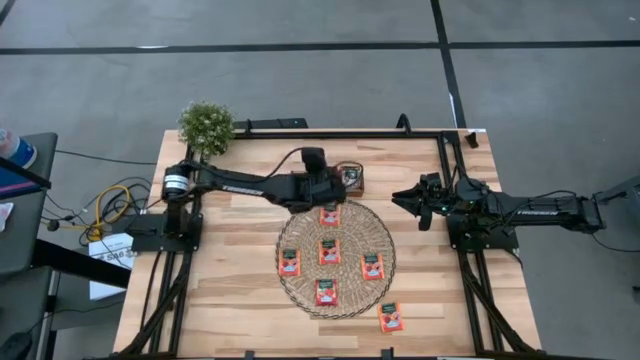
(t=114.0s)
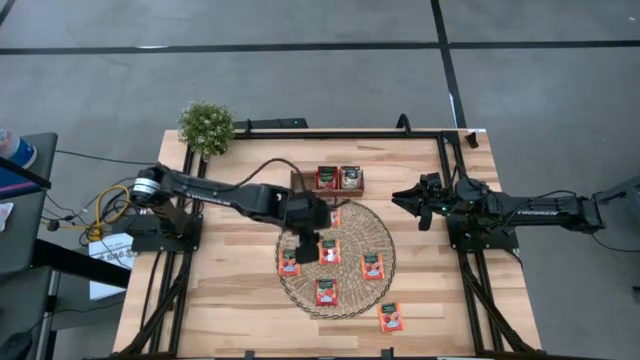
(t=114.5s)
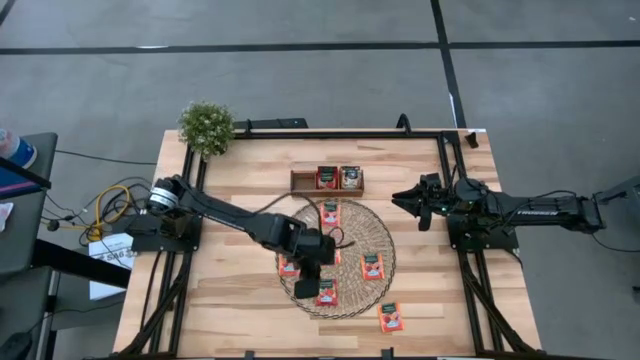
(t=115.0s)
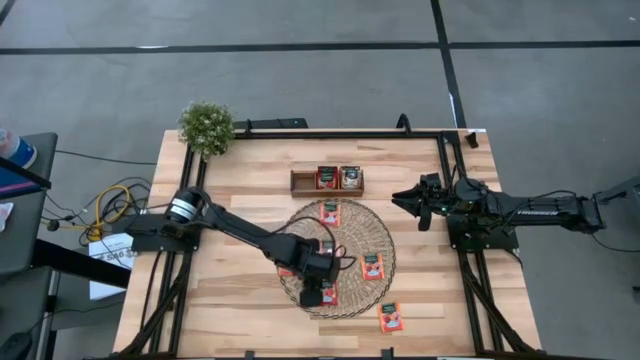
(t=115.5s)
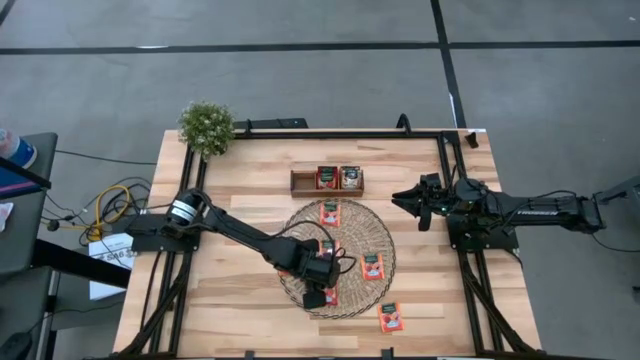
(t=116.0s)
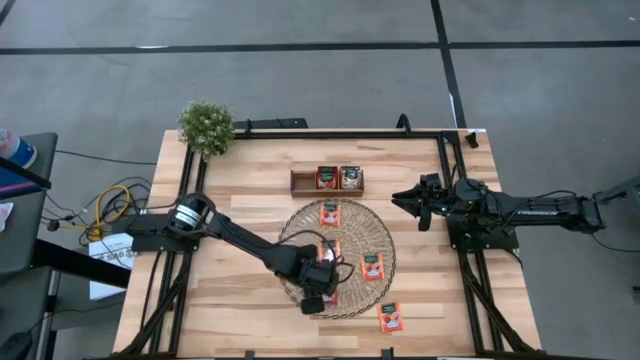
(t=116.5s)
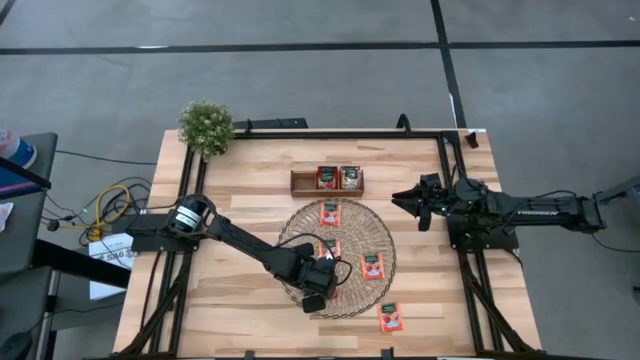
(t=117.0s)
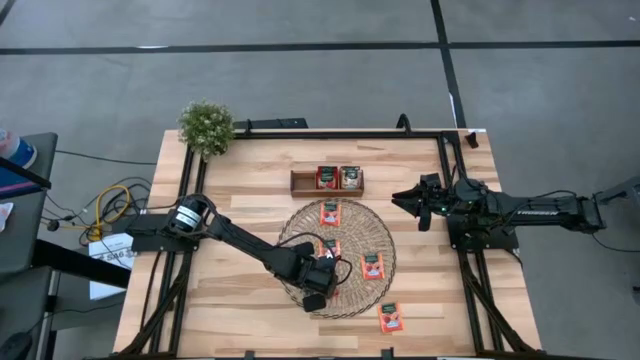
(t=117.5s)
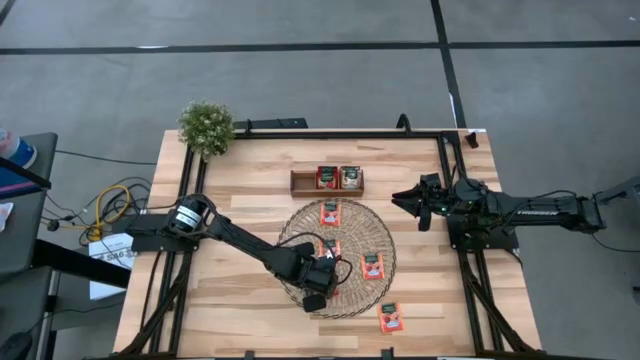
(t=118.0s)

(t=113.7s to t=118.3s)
Task: Pick & Place Tea
Put the red tea bag into the middle section of the wooden organizer

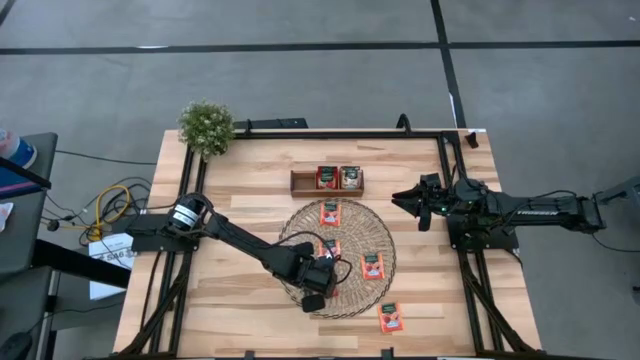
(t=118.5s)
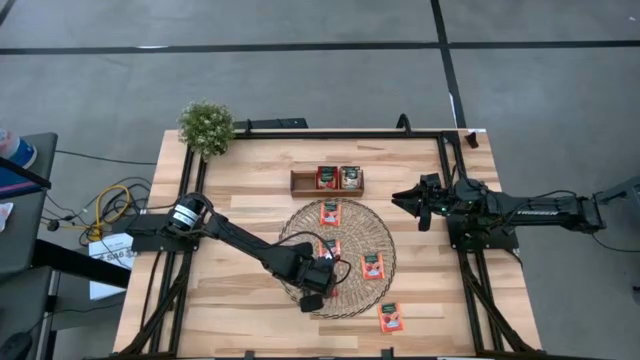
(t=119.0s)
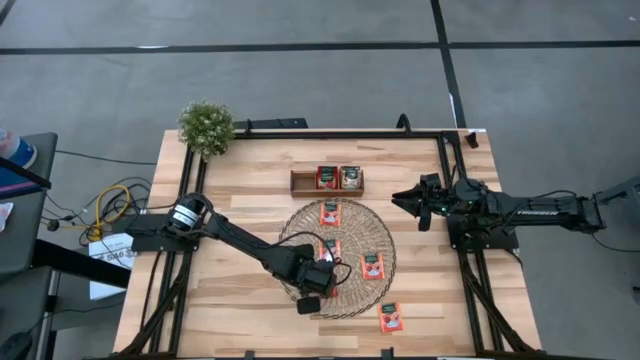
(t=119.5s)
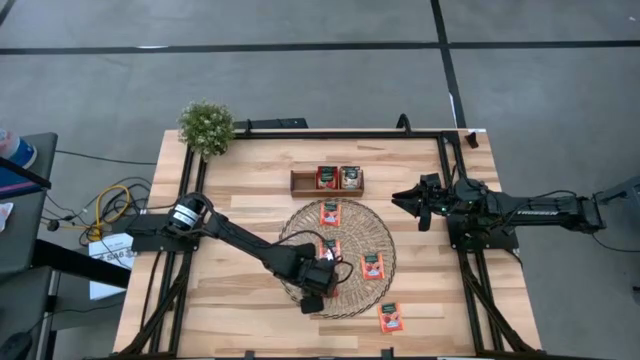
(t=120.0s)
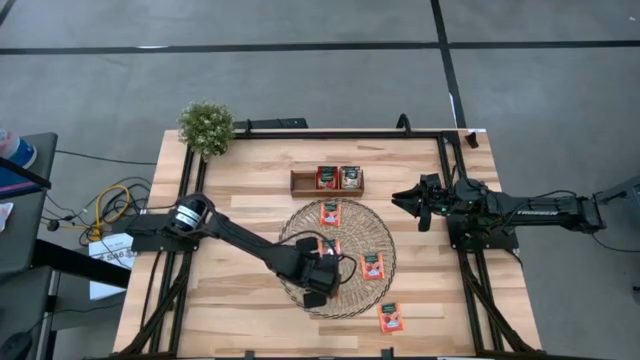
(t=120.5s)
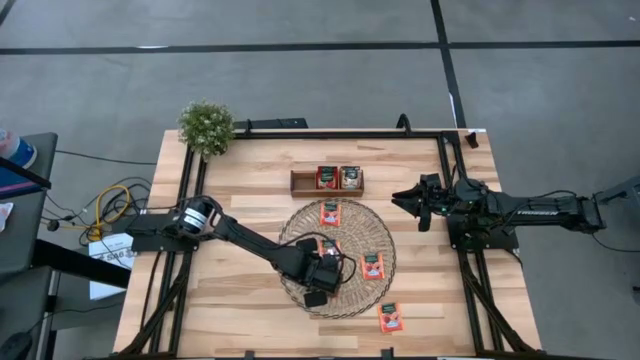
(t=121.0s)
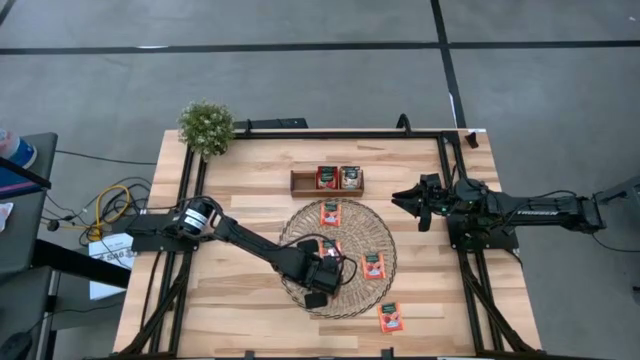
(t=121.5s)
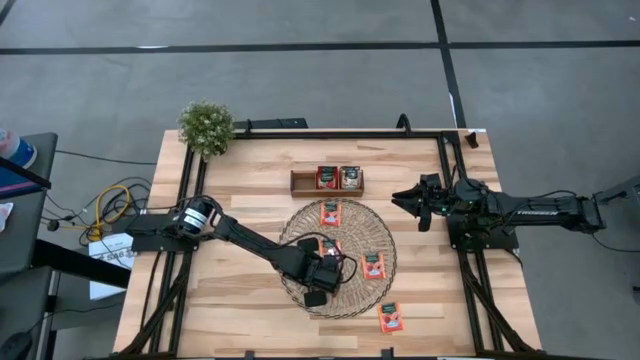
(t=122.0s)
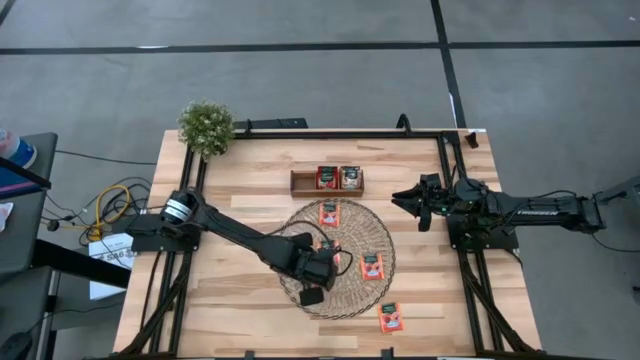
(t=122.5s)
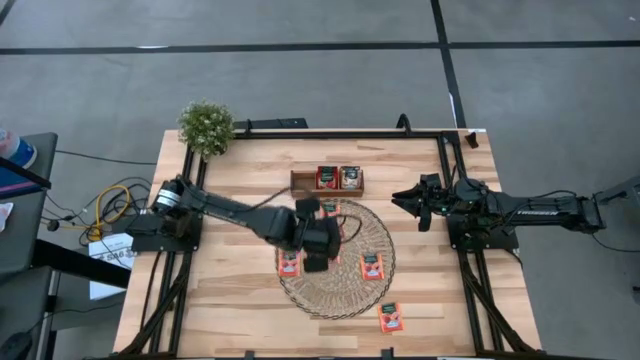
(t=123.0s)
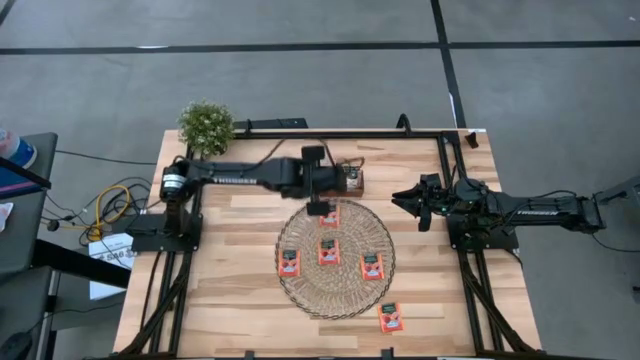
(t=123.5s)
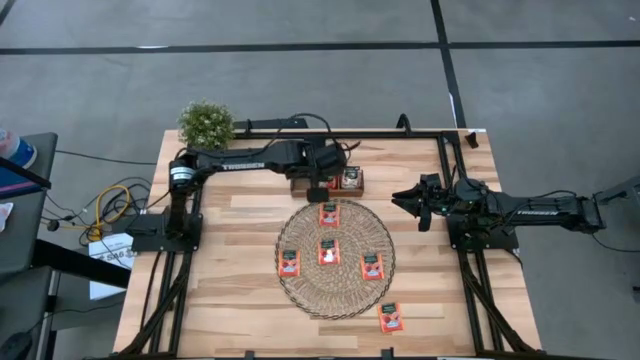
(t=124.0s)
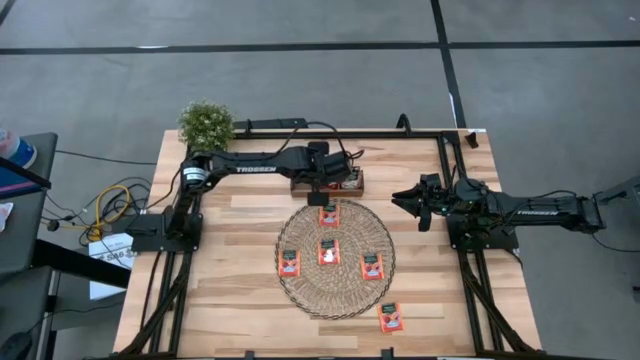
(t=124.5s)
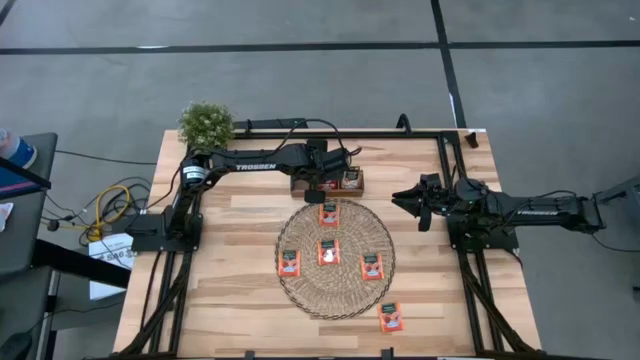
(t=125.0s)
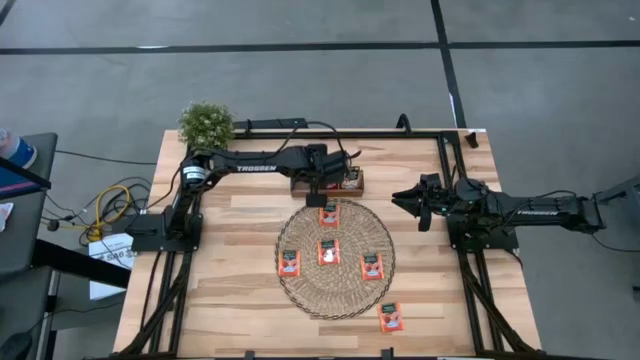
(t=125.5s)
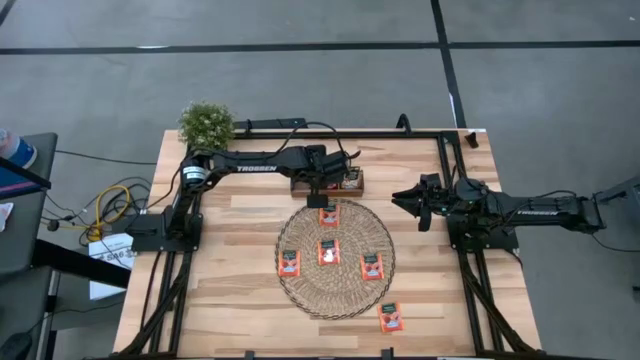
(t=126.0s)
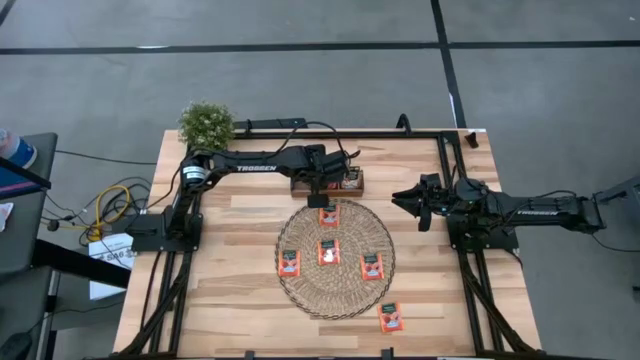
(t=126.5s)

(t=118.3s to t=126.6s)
Put the red tea bag into the middle section of the wooden organizer

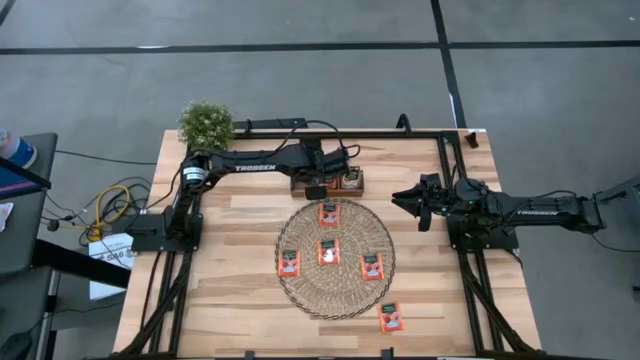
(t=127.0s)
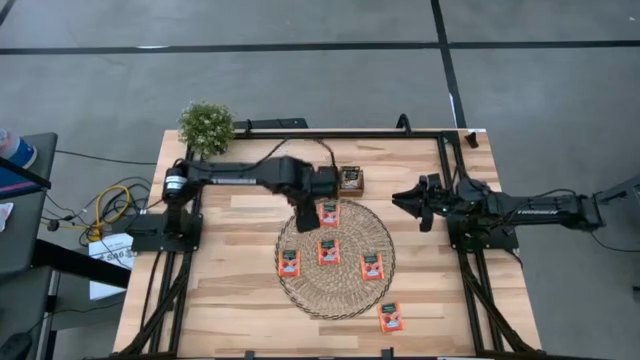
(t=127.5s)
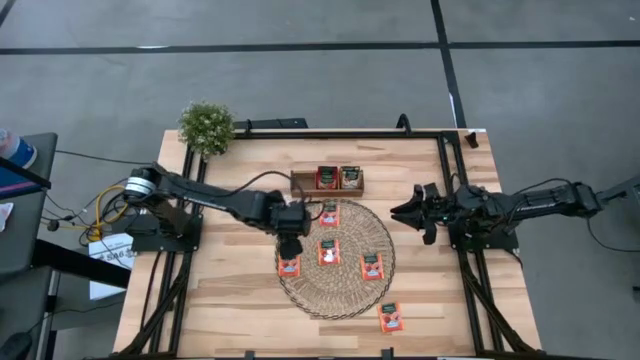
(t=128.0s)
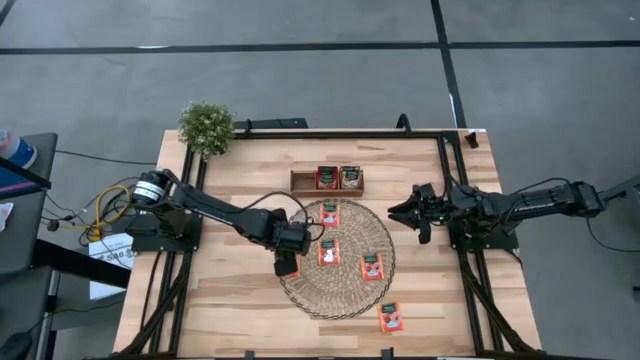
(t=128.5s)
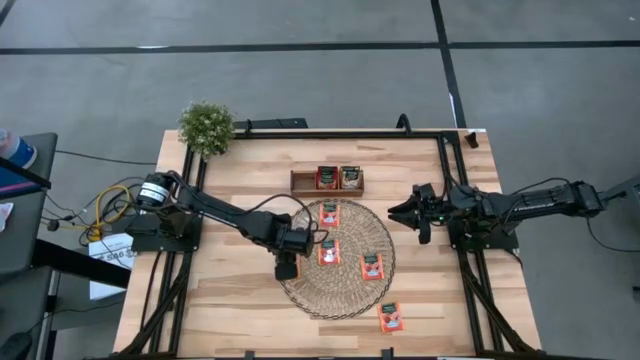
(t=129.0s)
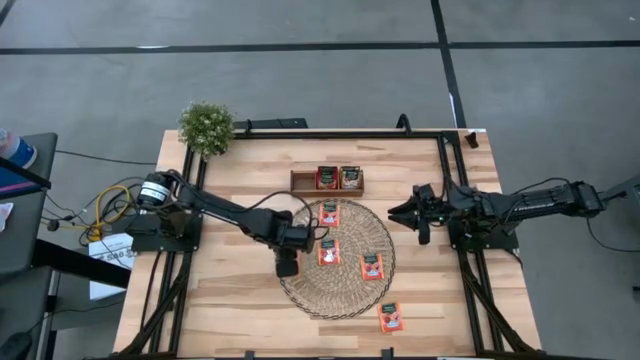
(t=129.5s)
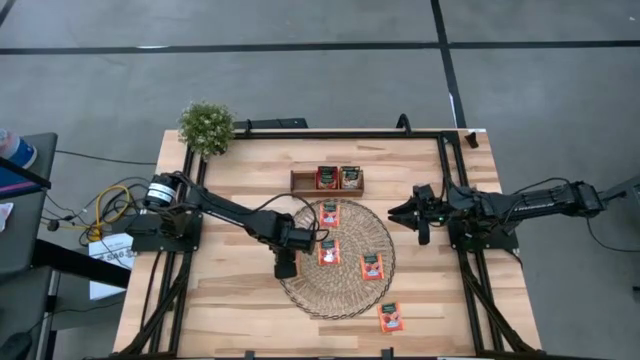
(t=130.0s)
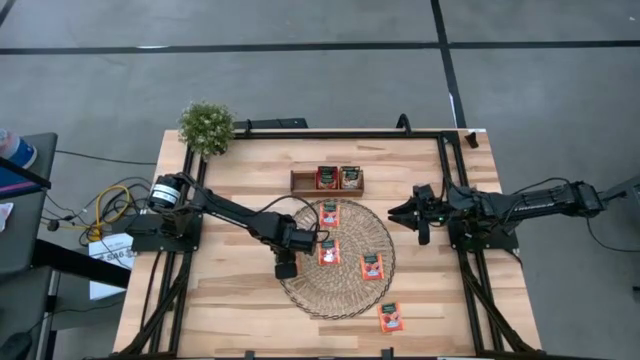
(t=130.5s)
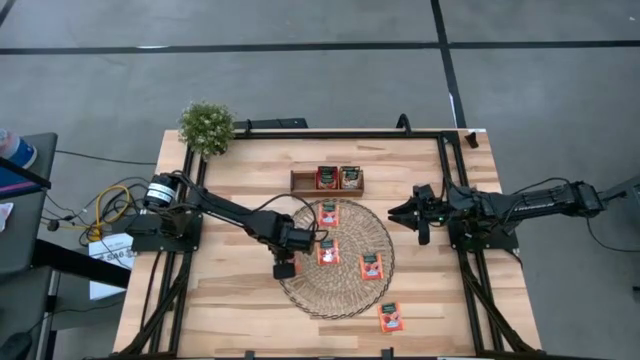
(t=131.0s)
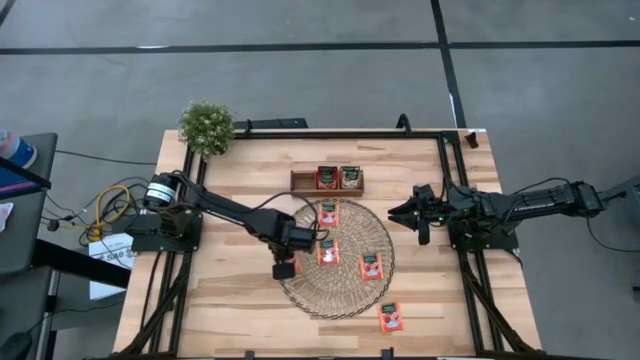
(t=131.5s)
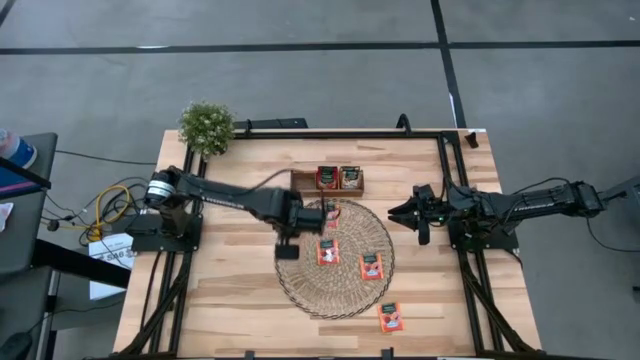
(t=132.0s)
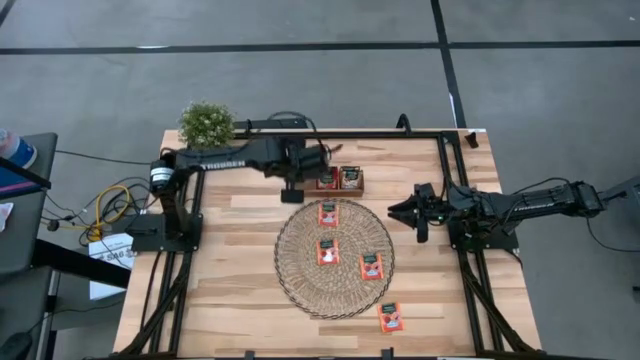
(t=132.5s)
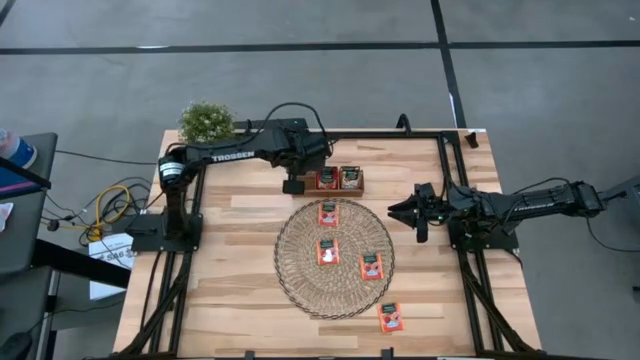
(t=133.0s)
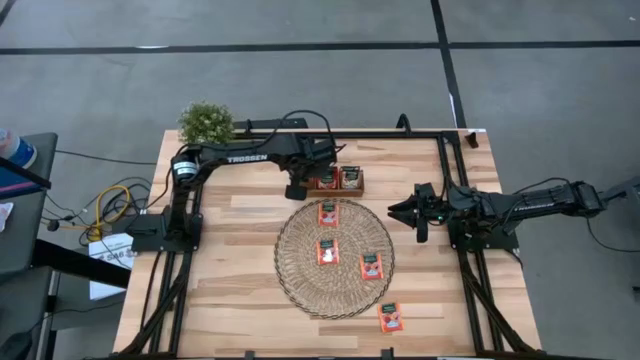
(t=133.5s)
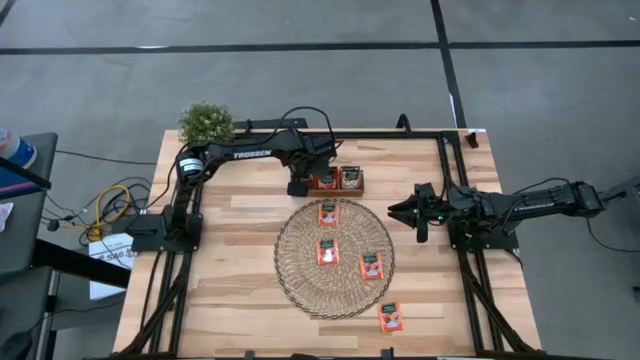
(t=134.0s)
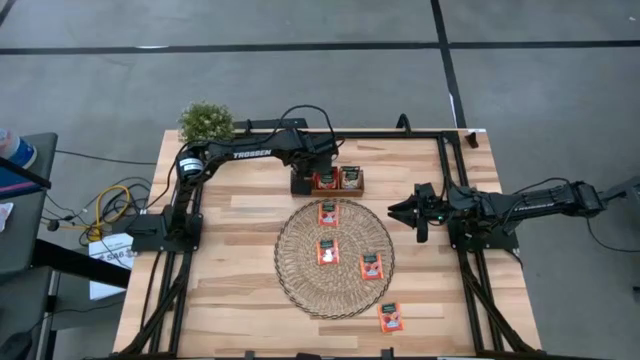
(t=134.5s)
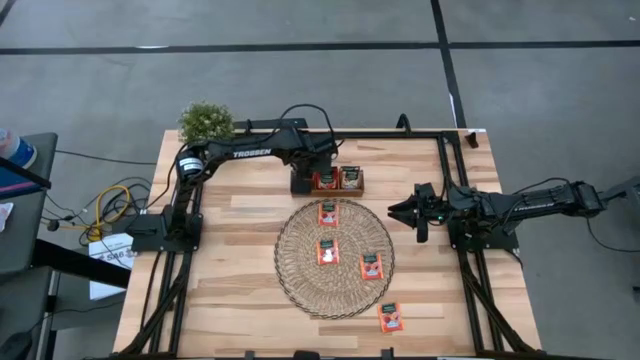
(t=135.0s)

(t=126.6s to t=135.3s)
Put the orange tea bag into the left section of the wooden organizer
